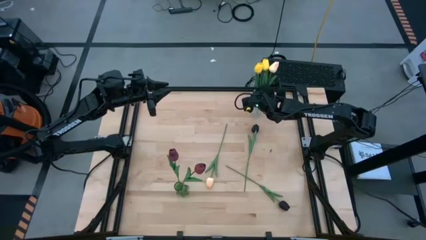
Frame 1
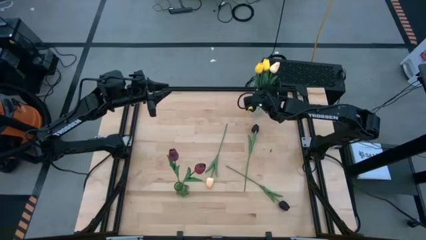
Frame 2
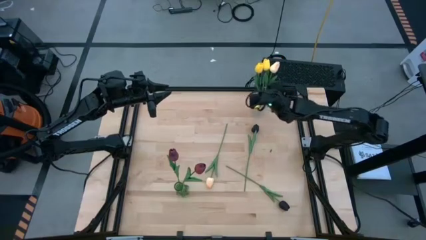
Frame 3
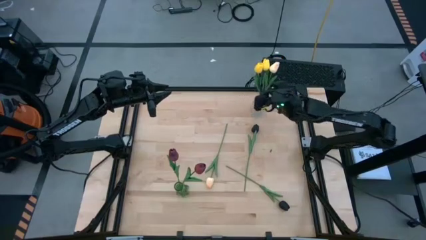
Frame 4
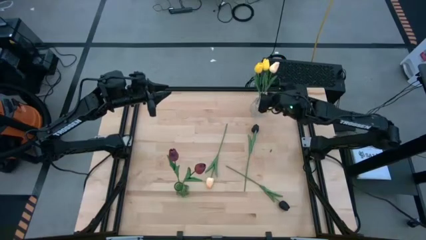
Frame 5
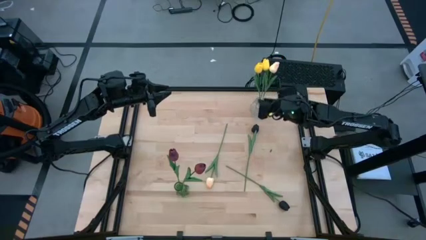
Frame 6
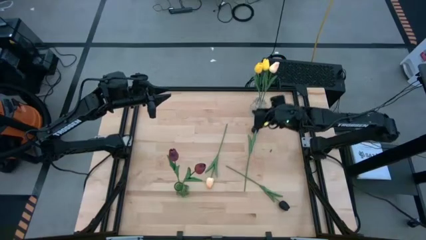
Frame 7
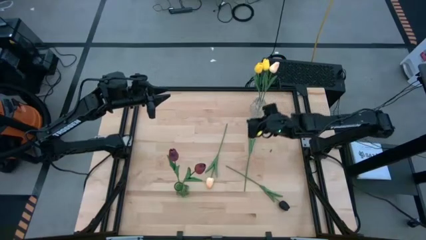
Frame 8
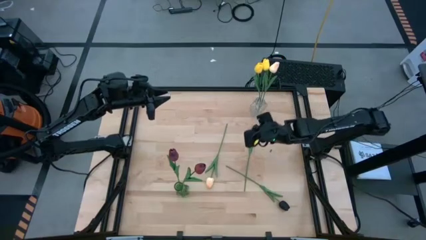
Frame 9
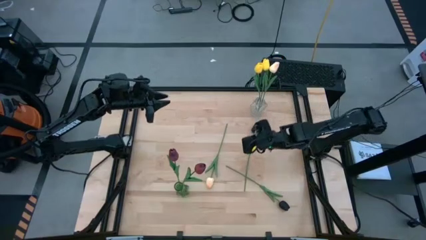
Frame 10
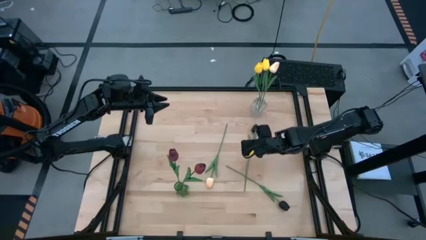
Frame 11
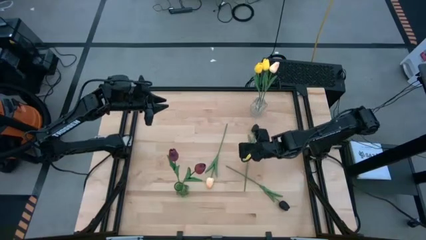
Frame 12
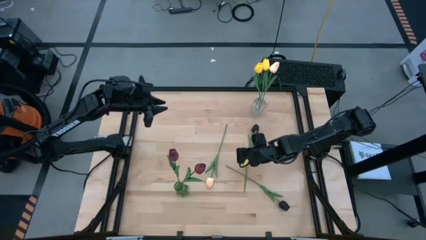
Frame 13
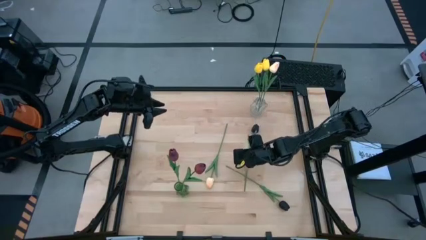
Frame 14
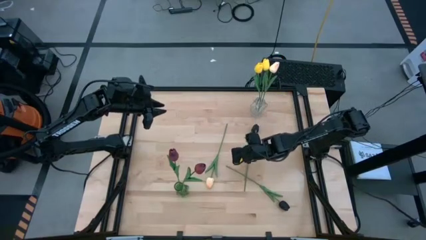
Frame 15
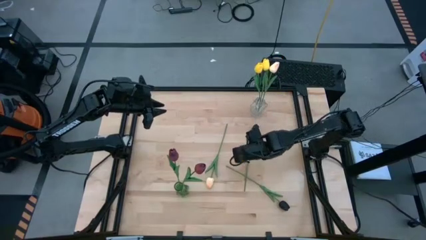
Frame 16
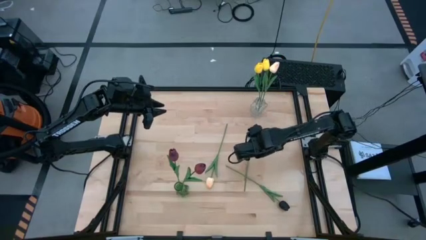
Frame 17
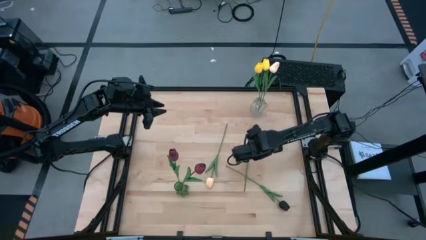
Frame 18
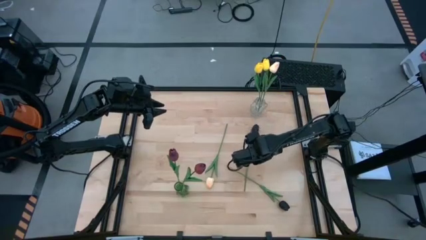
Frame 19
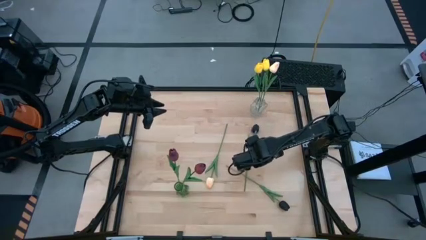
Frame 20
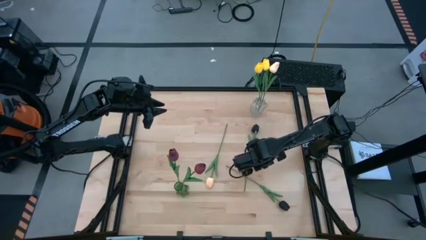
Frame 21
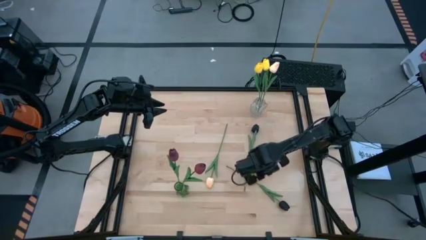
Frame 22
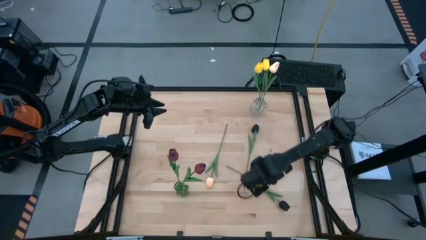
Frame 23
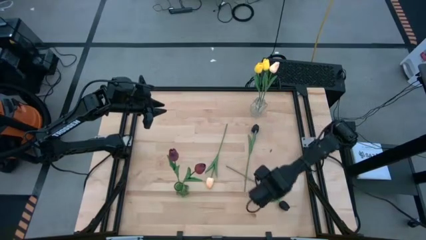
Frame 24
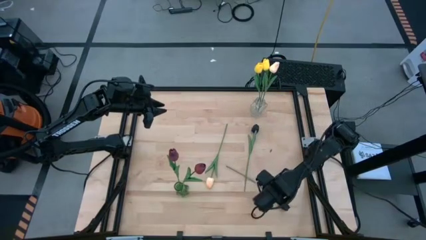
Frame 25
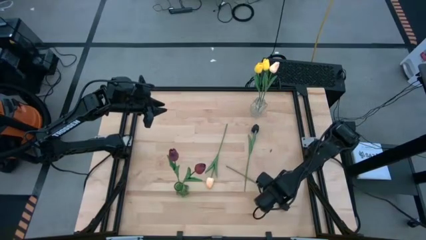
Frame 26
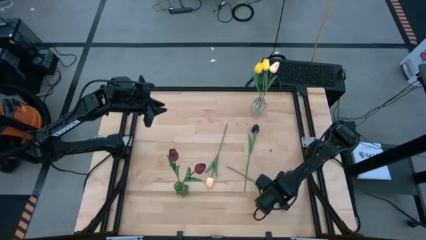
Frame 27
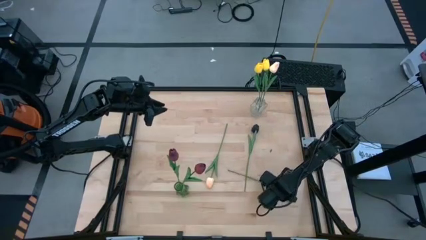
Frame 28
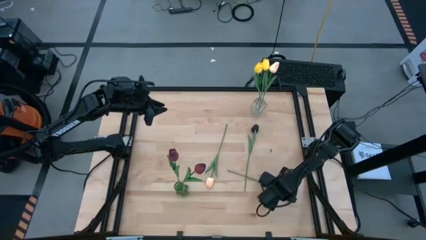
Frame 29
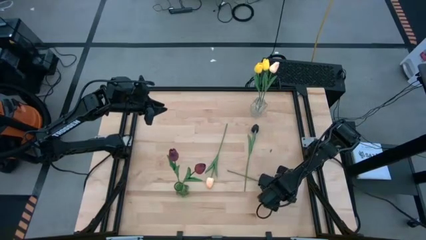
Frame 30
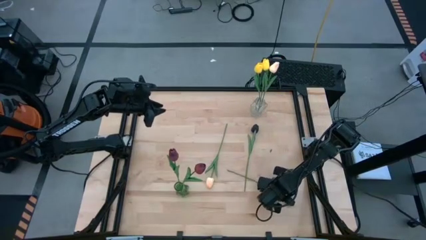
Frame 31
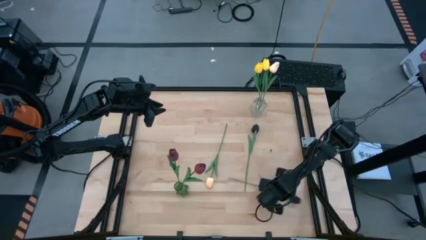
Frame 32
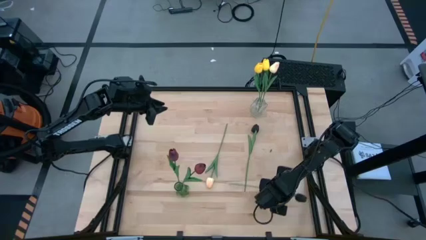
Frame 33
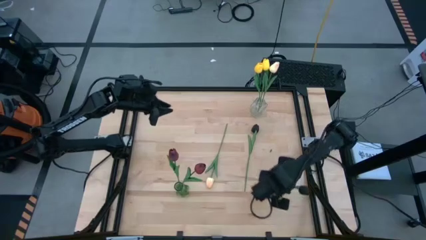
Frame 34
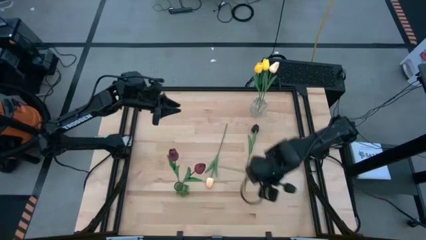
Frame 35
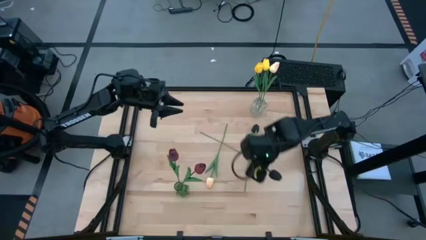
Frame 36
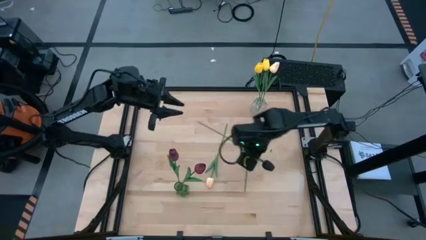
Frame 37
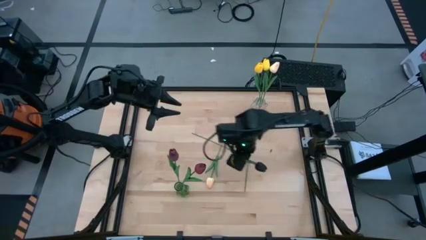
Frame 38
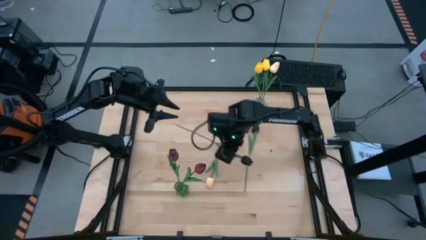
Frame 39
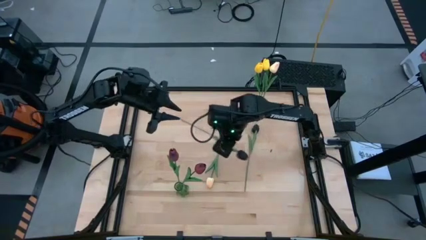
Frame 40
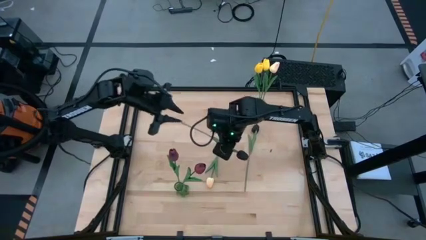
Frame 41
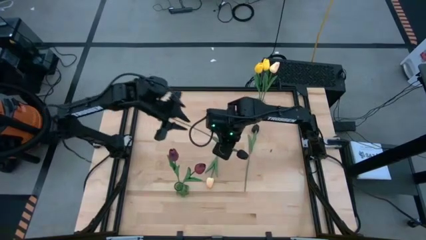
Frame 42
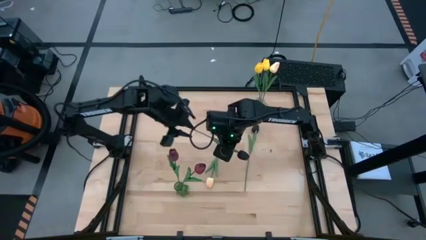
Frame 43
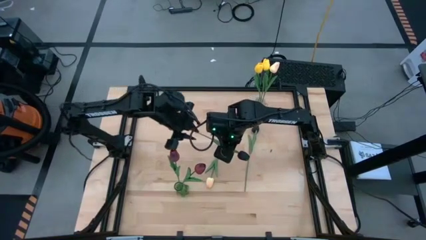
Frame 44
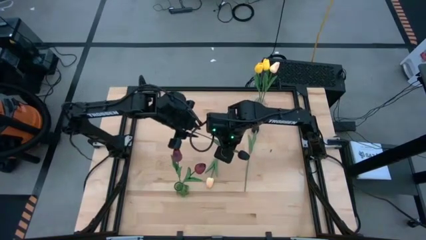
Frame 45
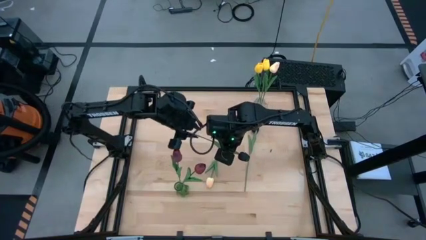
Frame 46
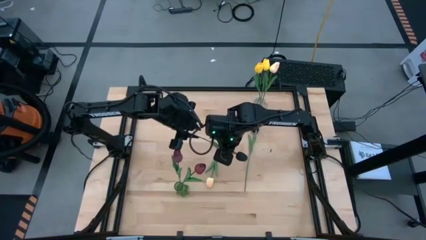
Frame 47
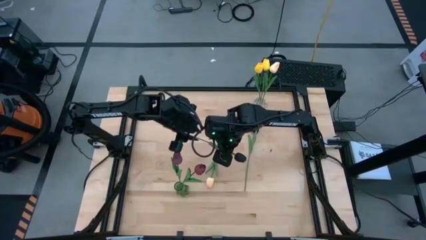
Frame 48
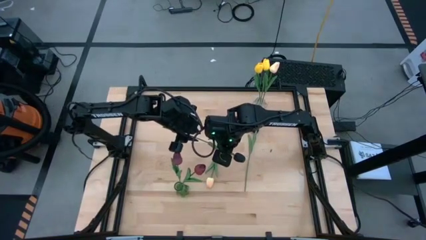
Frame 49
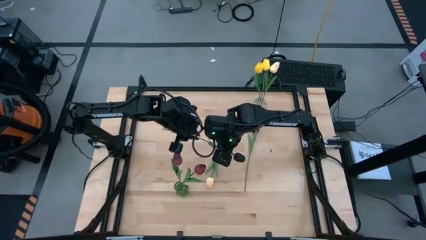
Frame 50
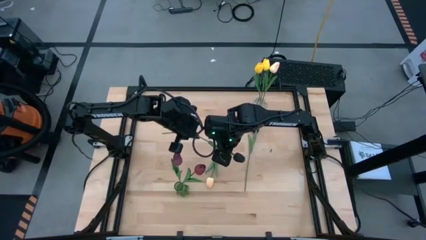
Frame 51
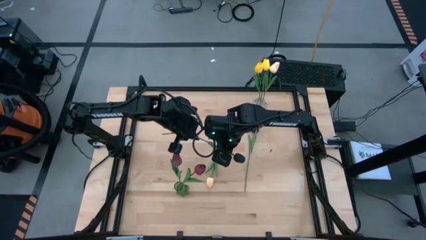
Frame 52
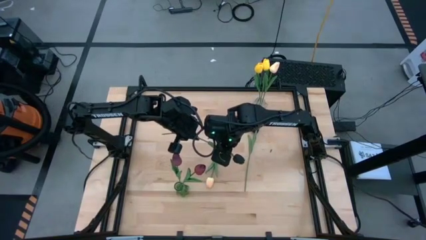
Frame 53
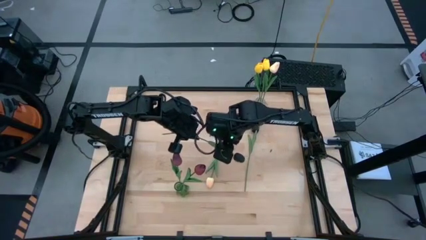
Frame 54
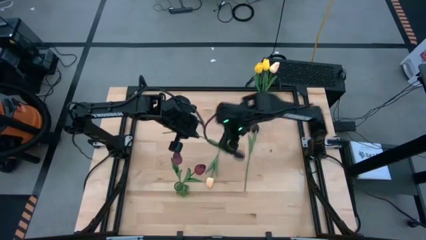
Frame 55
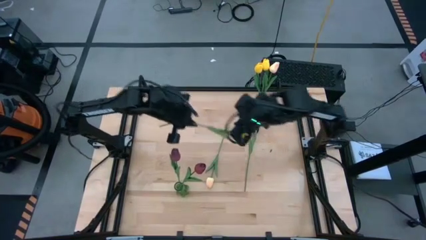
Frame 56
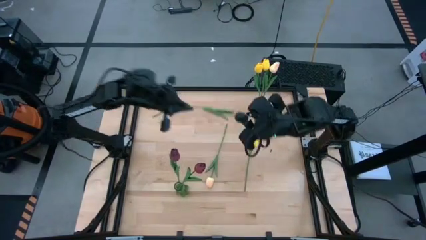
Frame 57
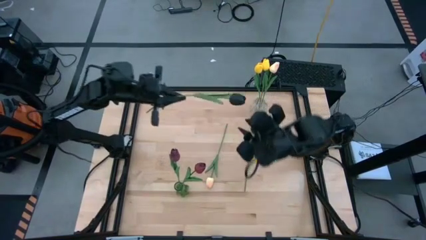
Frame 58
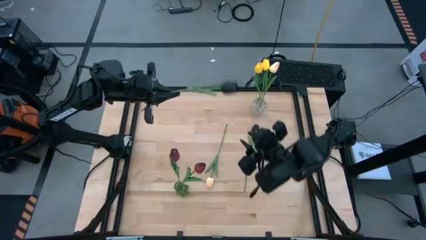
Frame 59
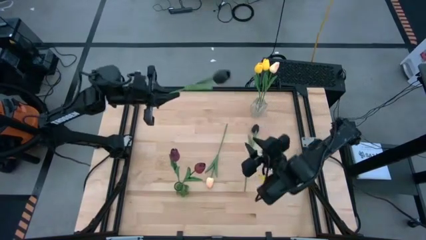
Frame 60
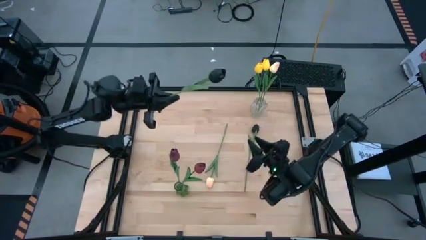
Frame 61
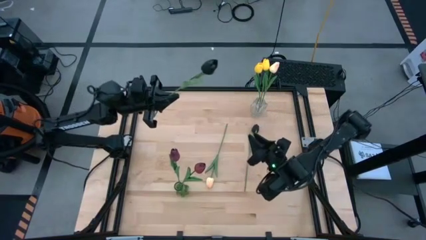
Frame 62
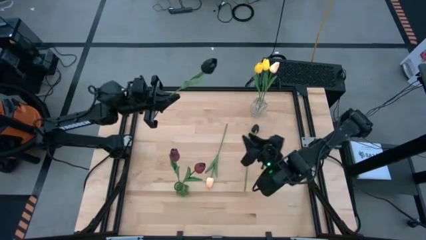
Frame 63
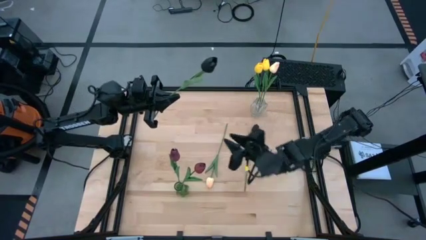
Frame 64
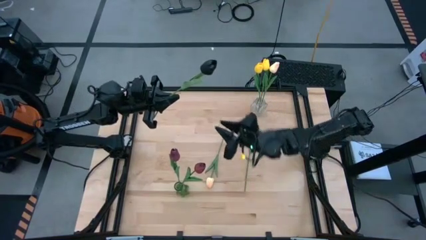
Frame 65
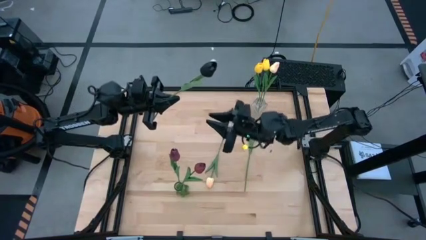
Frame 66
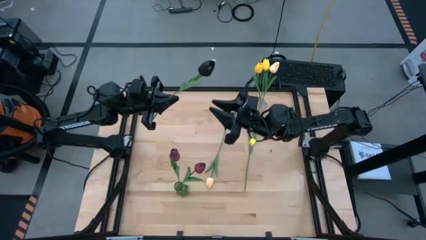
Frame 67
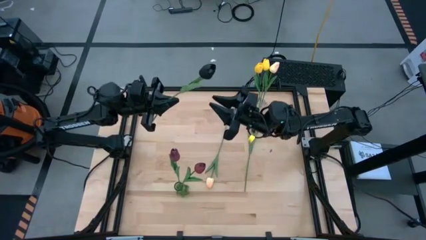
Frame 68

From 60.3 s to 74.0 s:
Task: Sort flowers into vase by color
Put the bottom black flower into the vase
